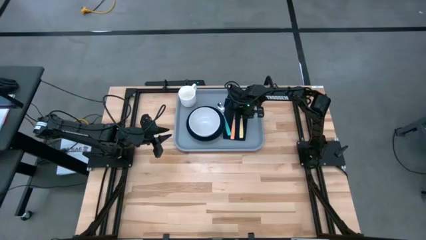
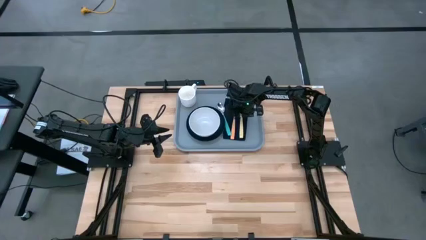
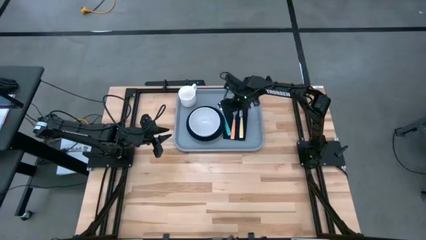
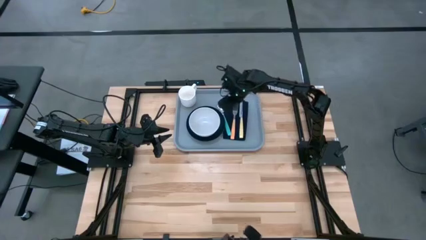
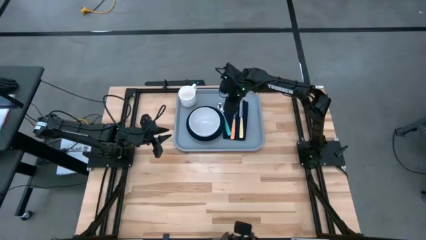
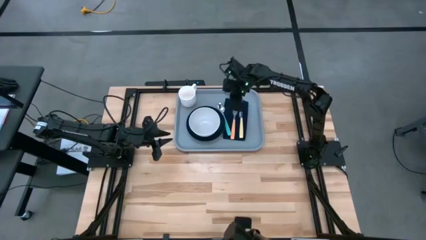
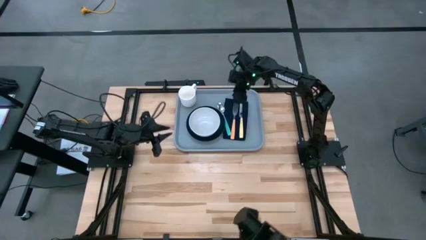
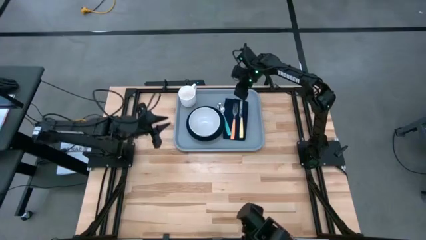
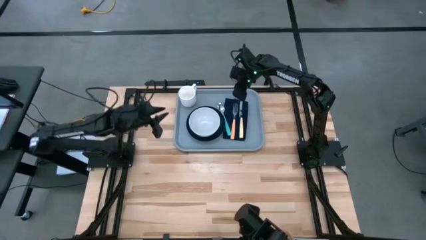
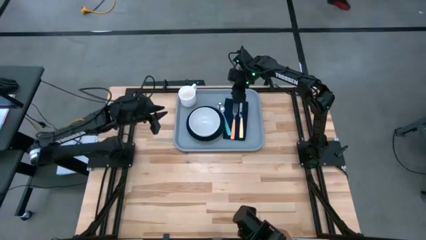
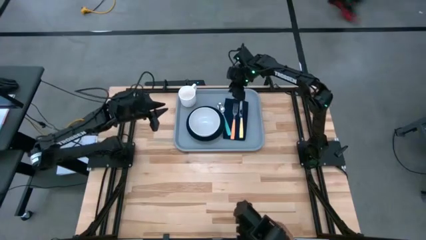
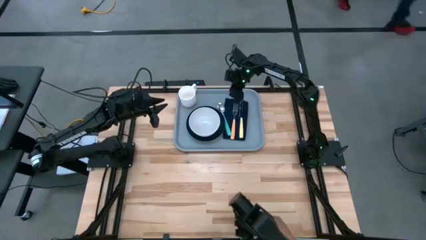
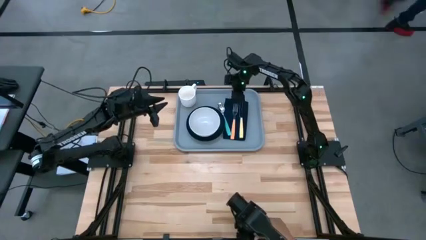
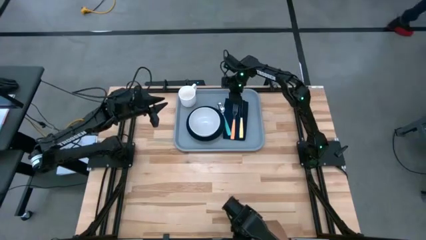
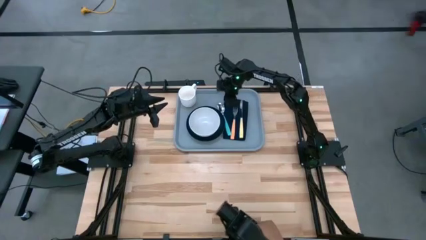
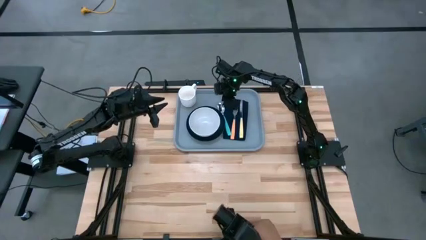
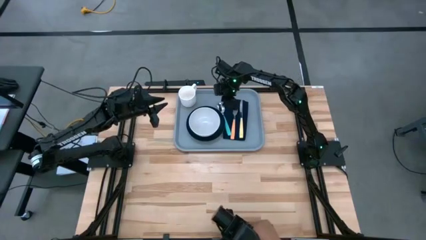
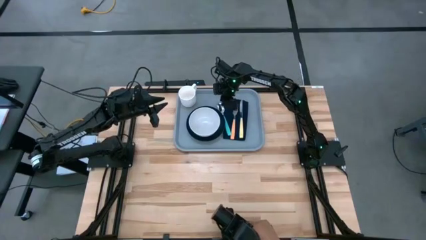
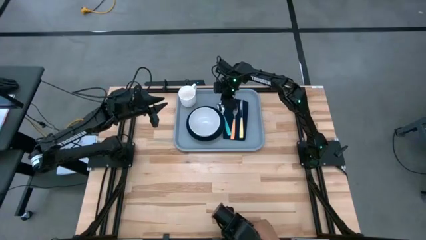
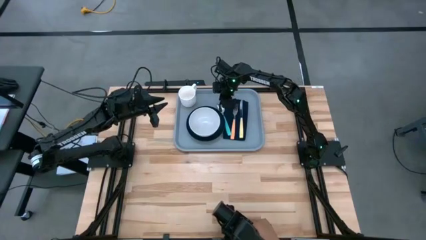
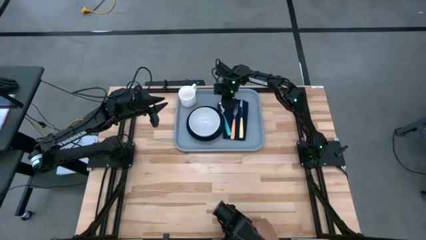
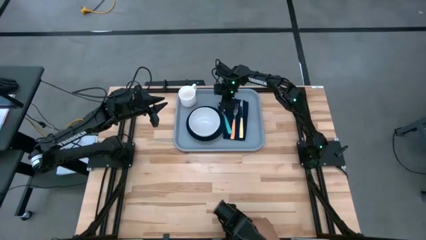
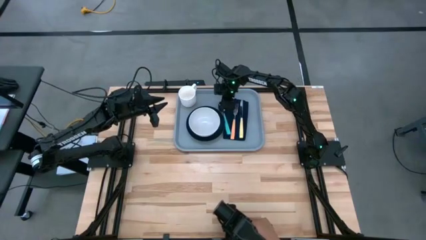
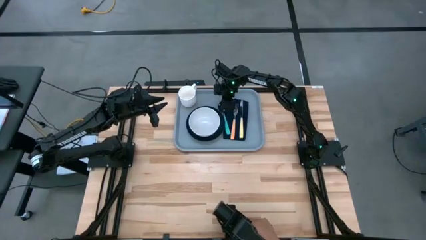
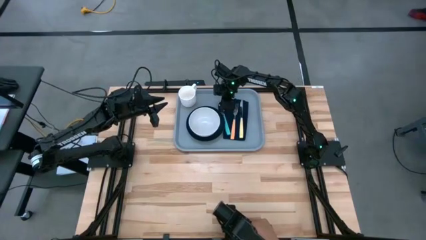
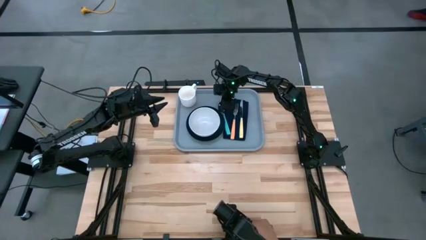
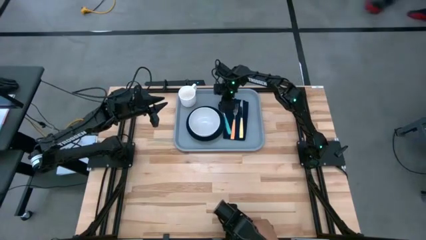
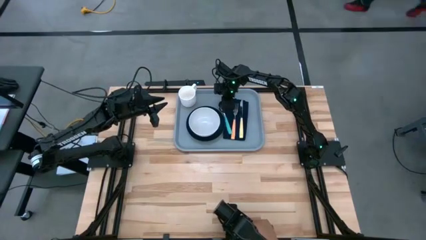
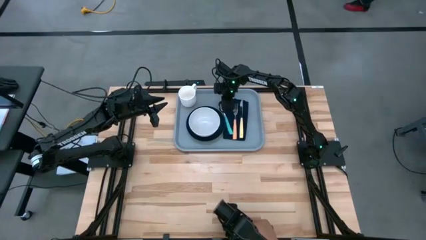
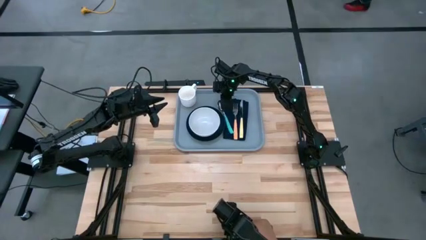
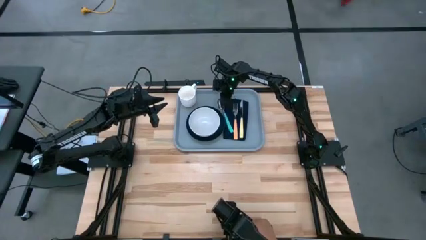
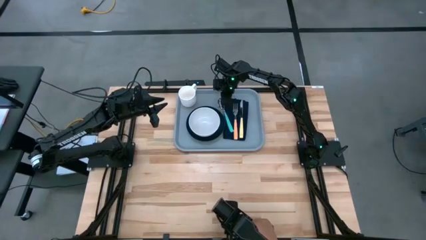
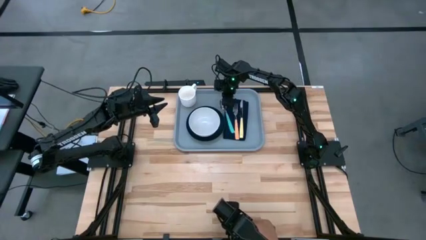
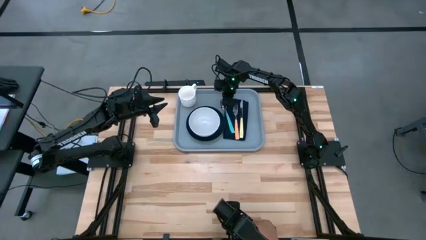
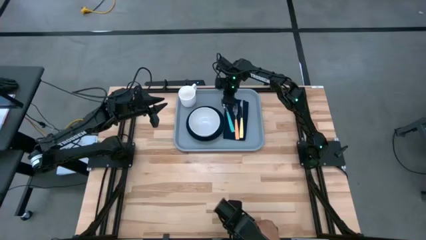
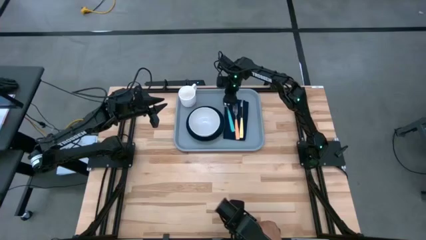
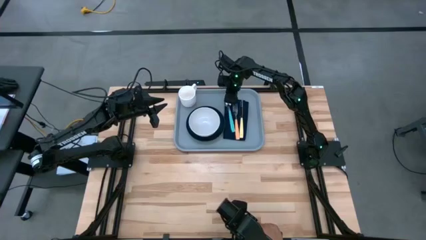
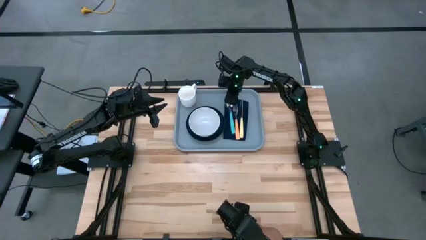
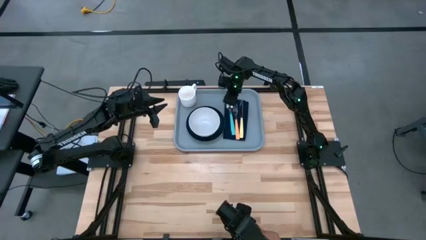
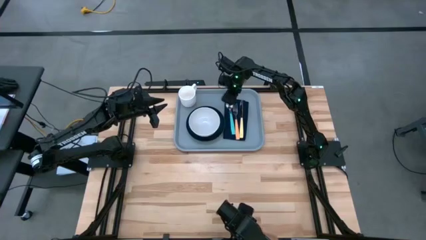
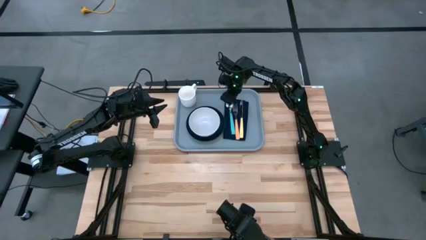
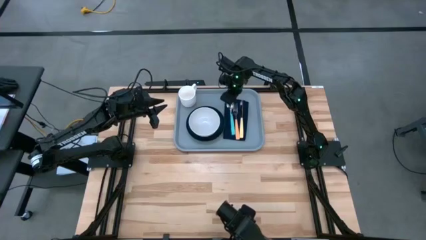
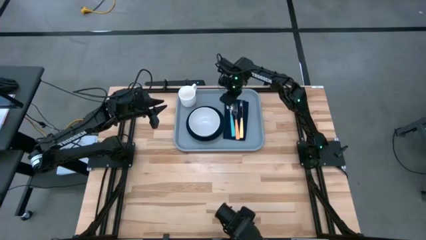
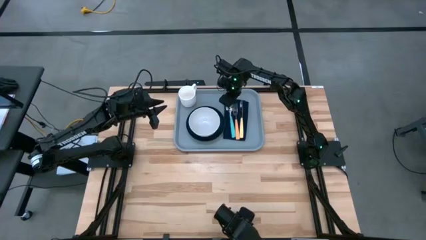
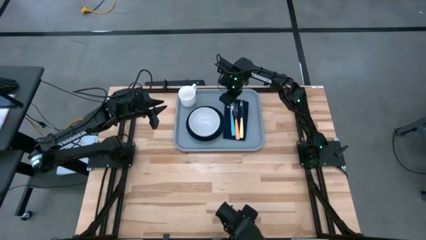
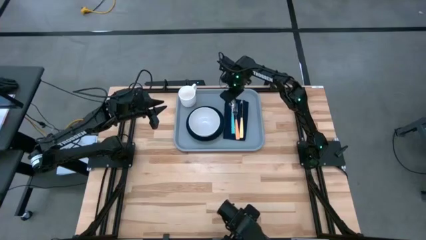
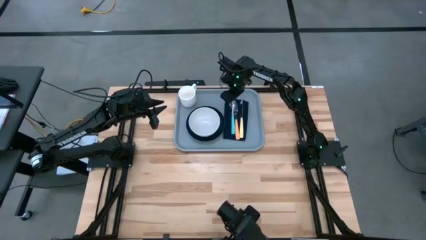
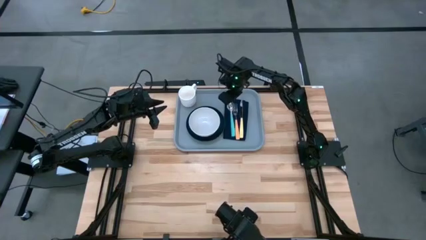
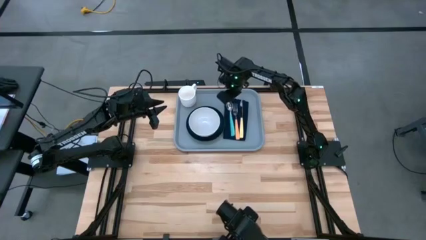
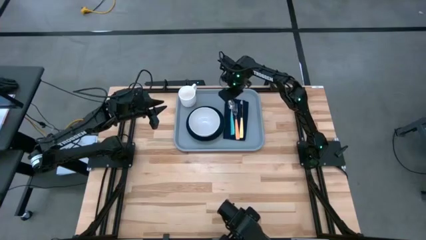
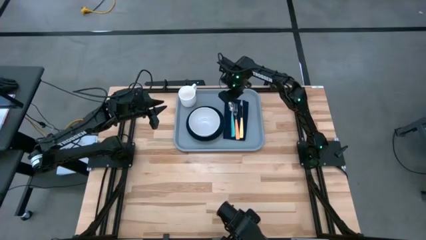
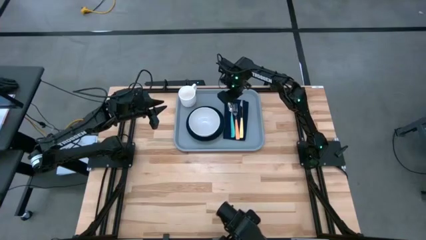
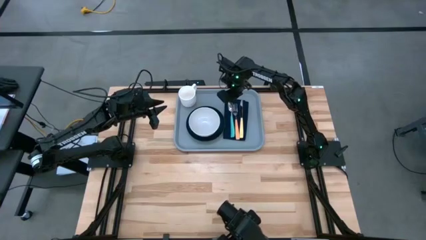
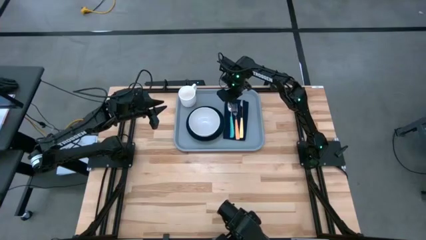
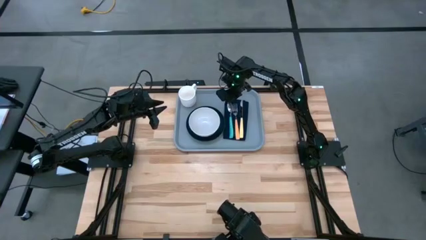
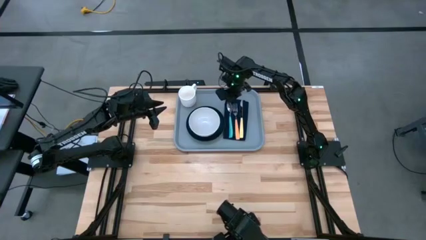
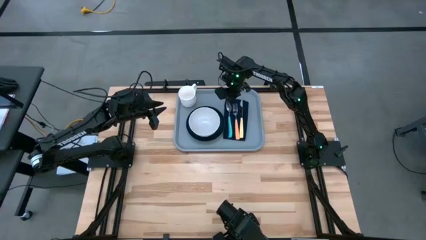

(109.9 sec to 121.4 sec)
Task: Set up tray
Adjust the blue spoon on top of the blue napkin on the gray tray

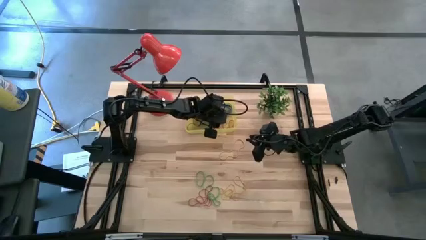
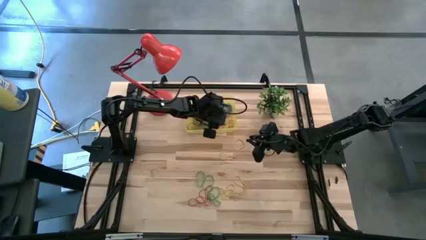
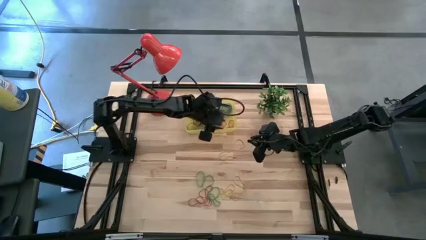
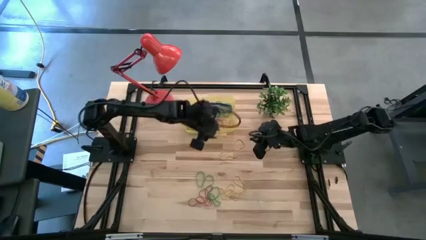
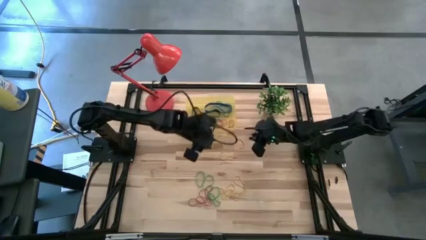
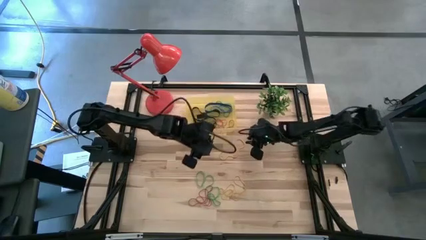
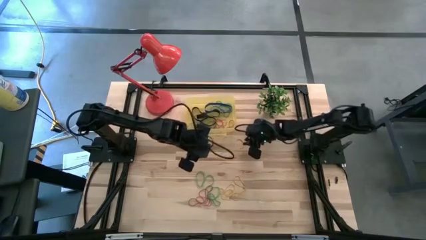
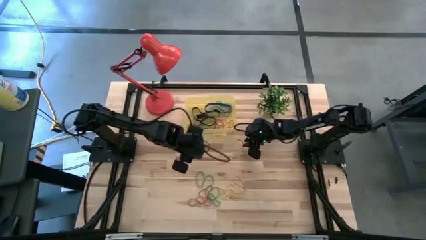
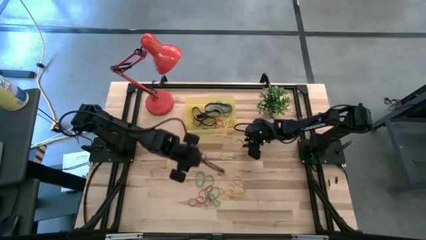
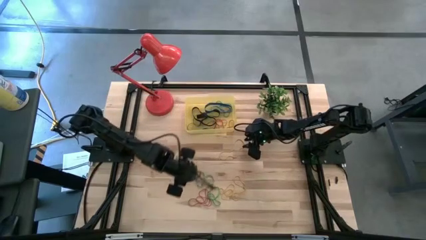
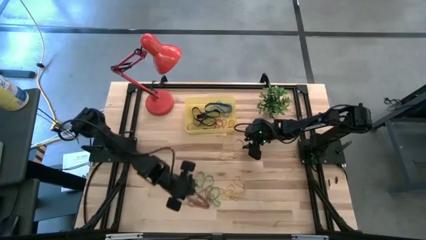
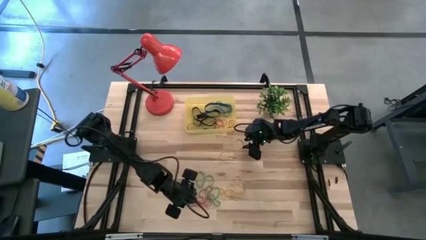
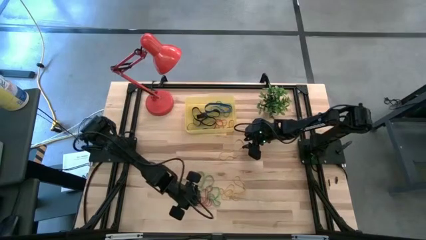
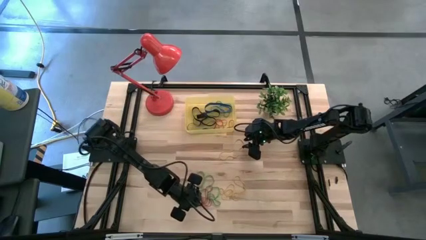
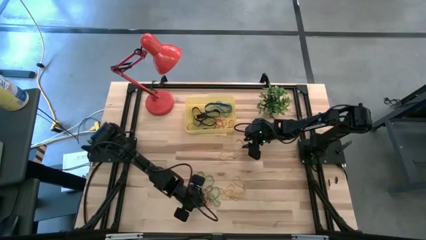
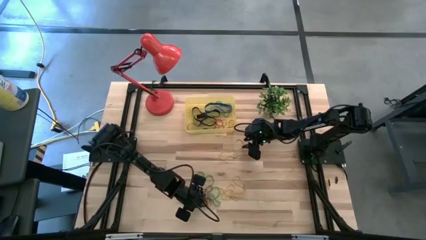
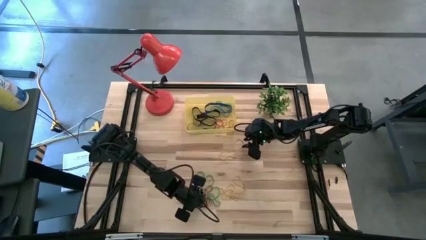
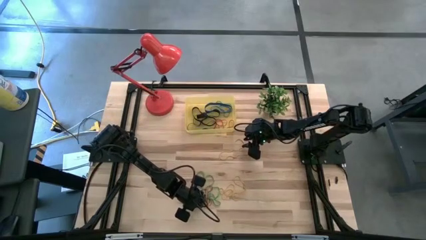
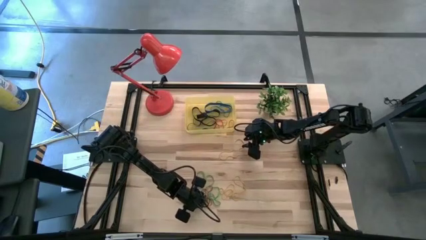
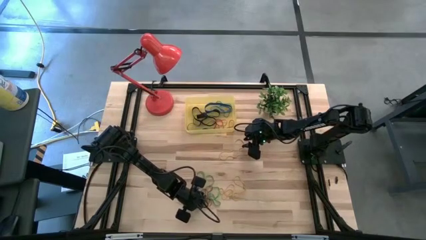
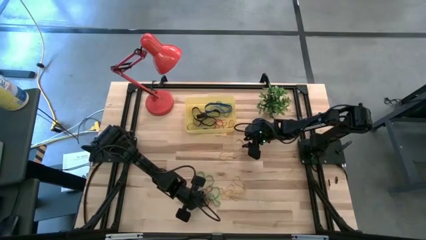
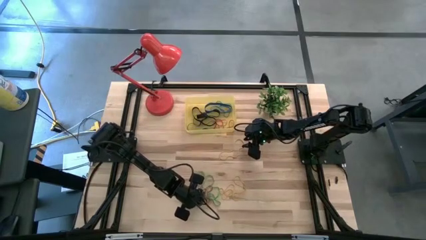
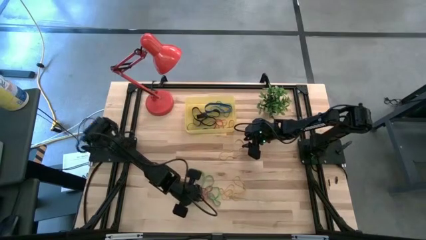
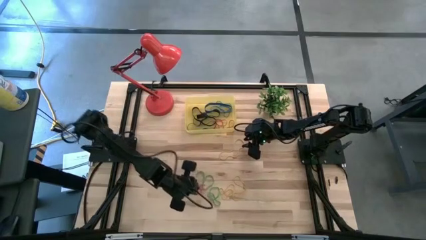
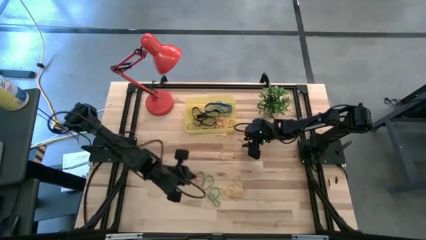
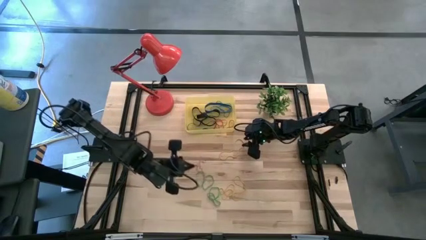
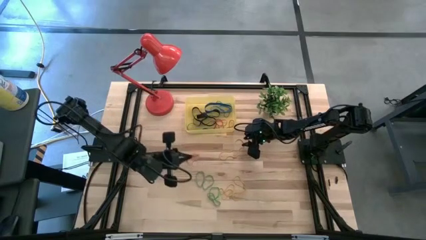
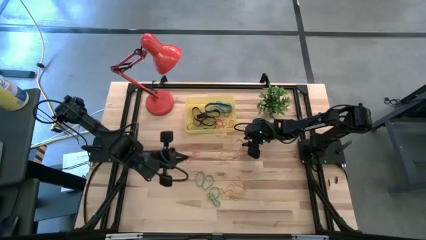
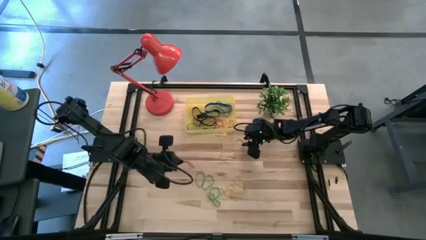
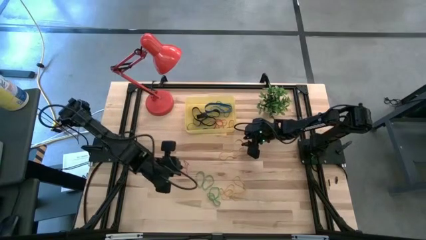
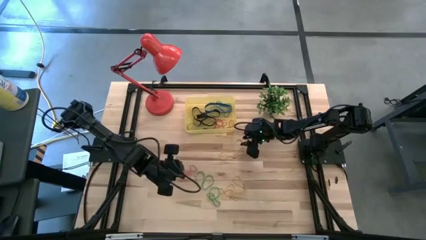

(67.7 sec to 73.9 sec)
Task: Pick and place rubber bands into bin
Put the red rubber band into the yellow container
